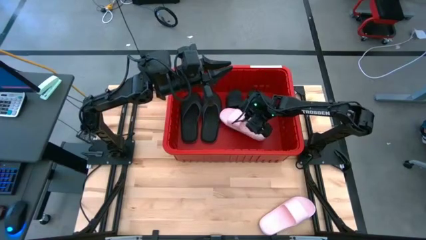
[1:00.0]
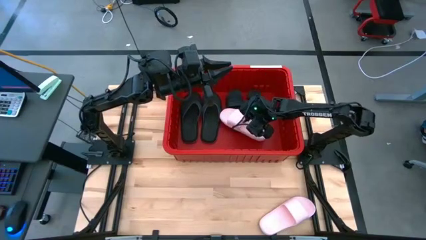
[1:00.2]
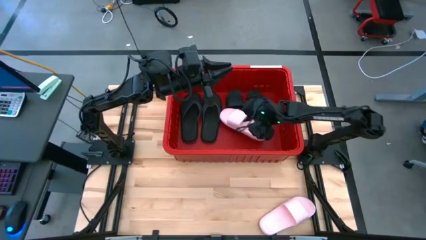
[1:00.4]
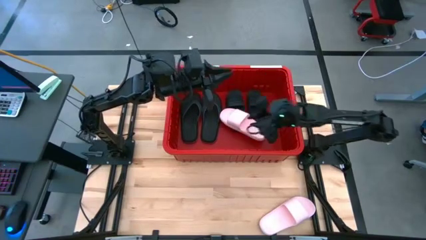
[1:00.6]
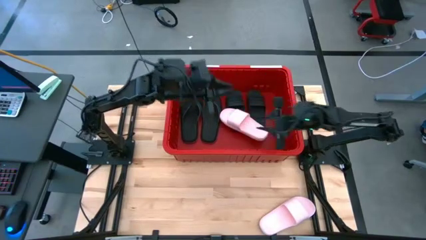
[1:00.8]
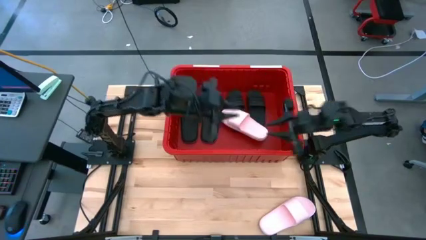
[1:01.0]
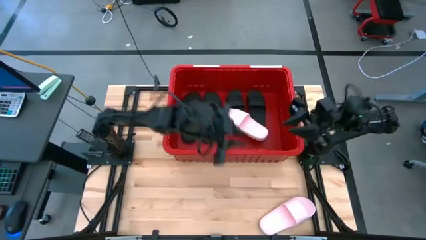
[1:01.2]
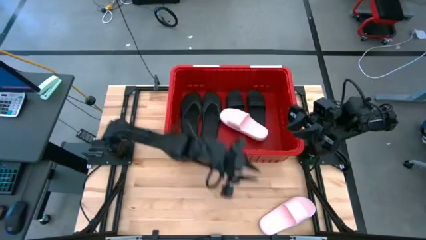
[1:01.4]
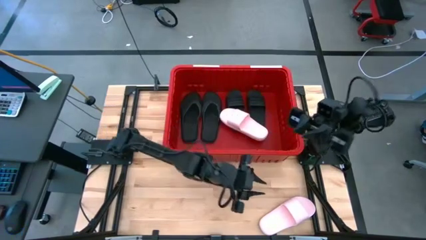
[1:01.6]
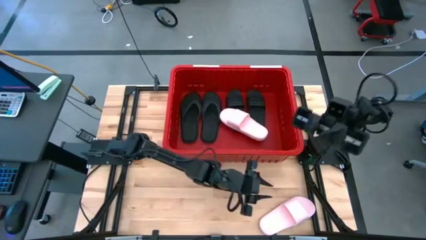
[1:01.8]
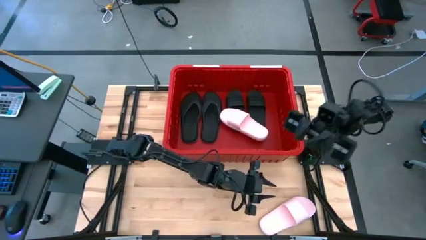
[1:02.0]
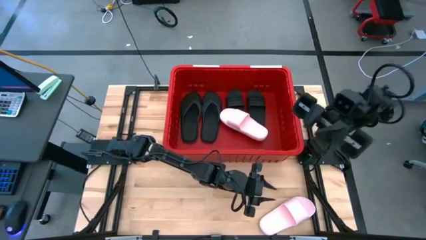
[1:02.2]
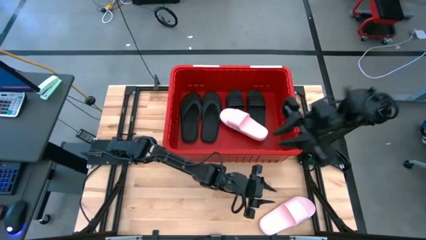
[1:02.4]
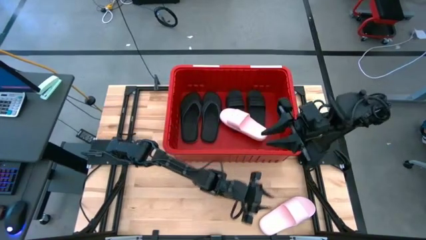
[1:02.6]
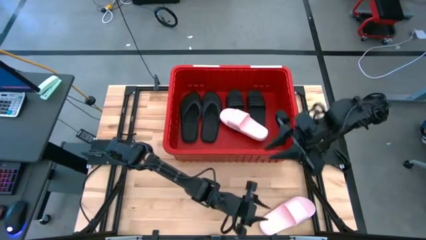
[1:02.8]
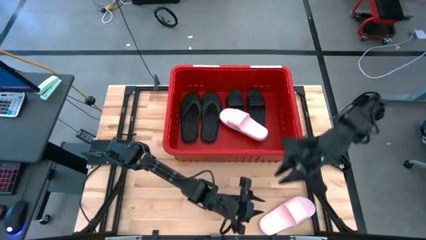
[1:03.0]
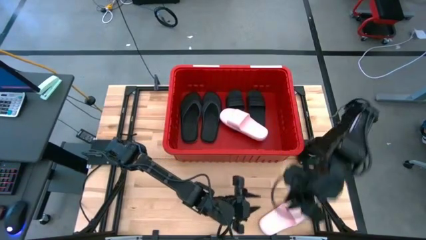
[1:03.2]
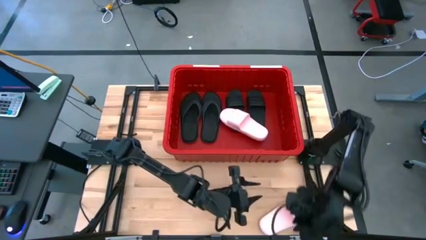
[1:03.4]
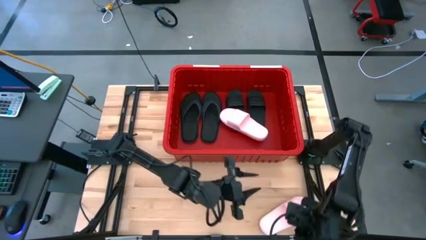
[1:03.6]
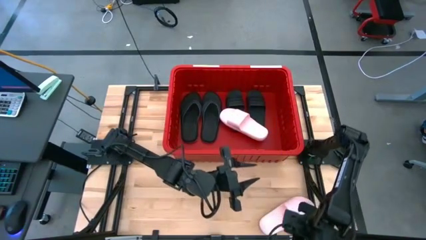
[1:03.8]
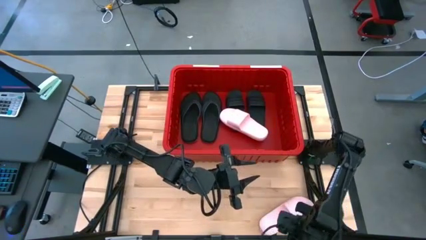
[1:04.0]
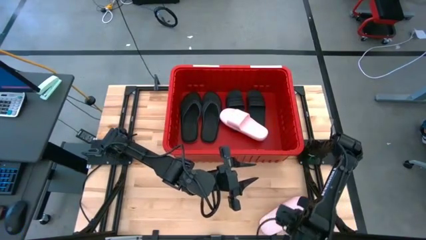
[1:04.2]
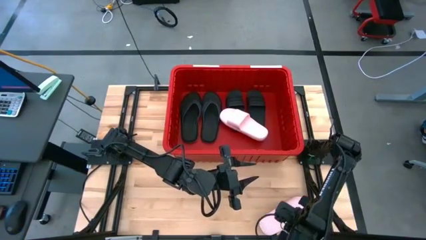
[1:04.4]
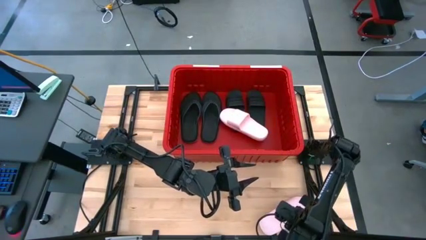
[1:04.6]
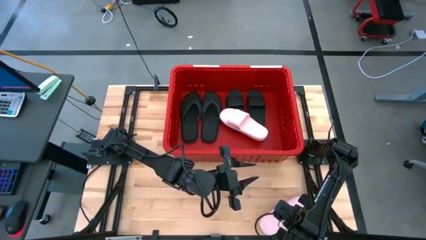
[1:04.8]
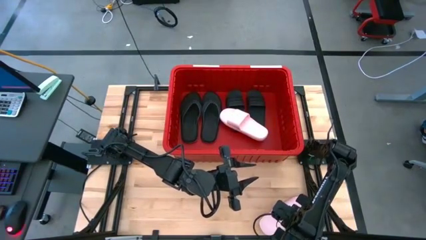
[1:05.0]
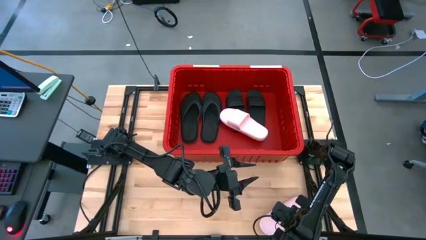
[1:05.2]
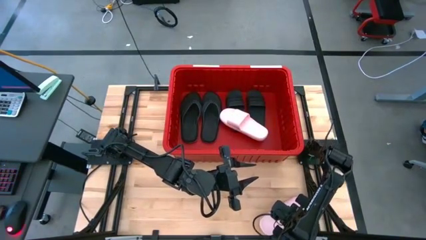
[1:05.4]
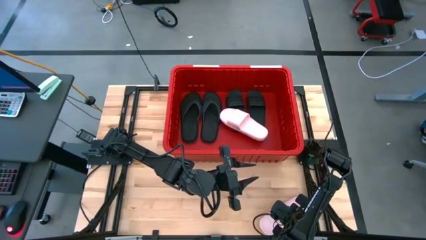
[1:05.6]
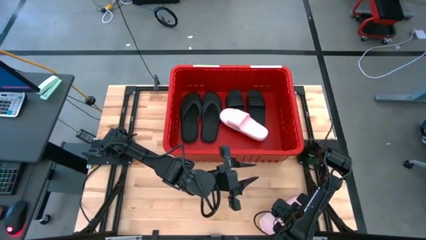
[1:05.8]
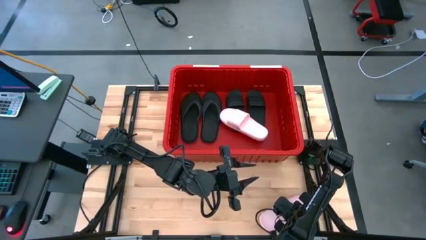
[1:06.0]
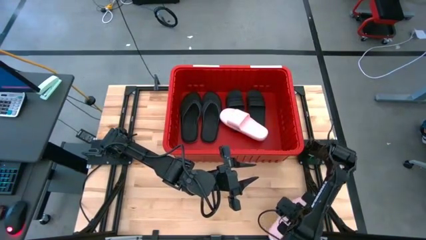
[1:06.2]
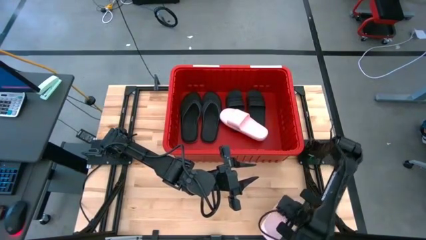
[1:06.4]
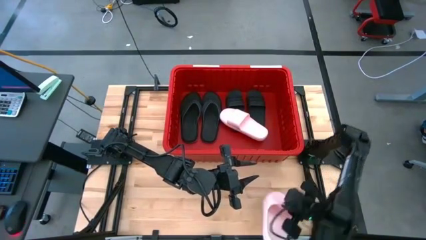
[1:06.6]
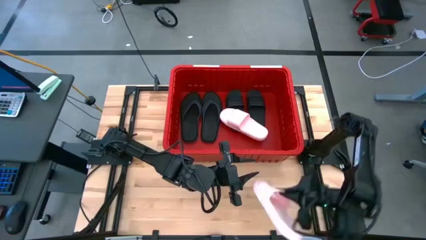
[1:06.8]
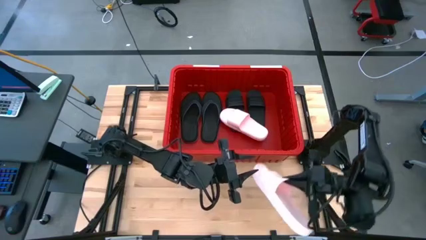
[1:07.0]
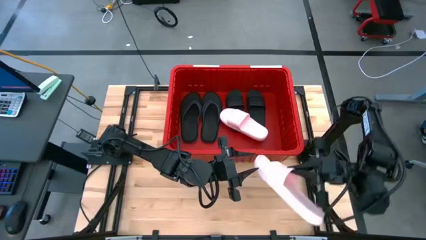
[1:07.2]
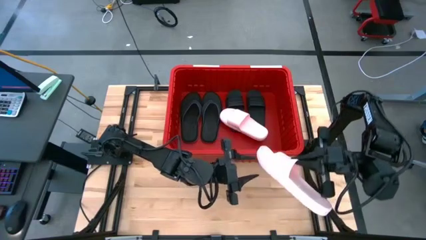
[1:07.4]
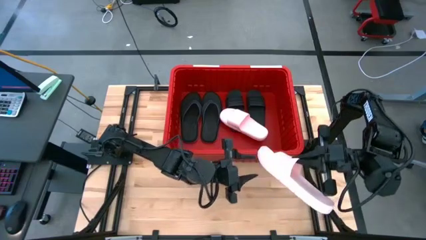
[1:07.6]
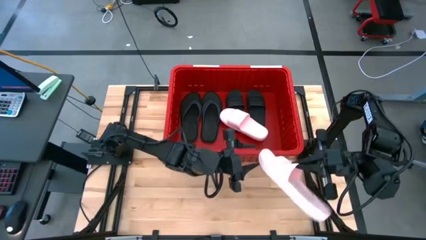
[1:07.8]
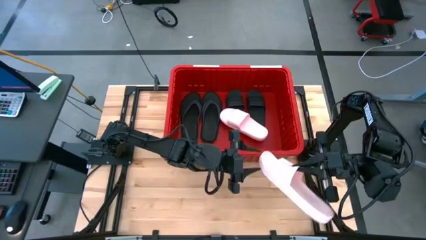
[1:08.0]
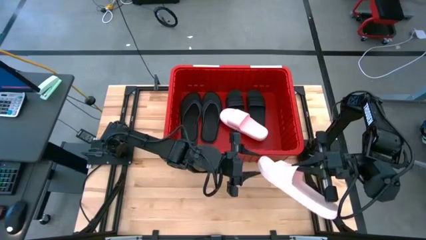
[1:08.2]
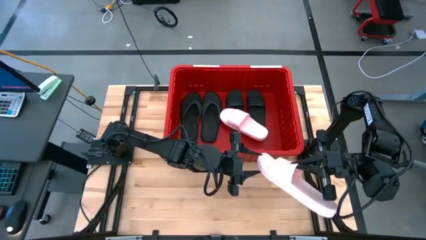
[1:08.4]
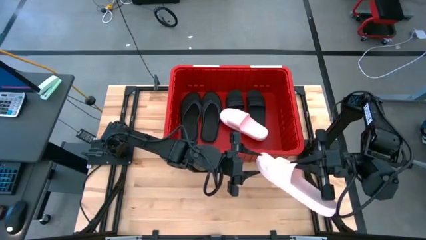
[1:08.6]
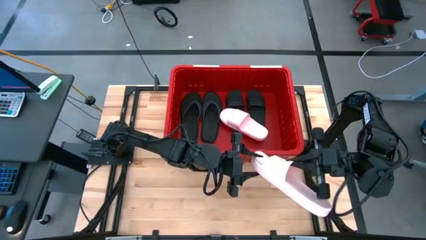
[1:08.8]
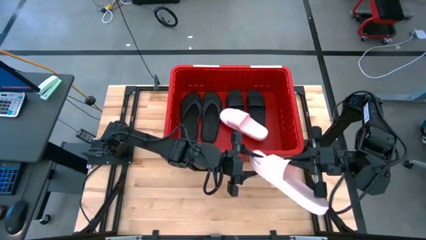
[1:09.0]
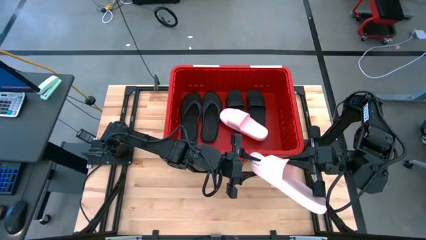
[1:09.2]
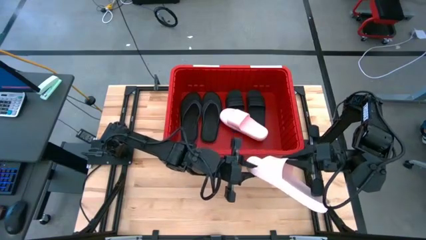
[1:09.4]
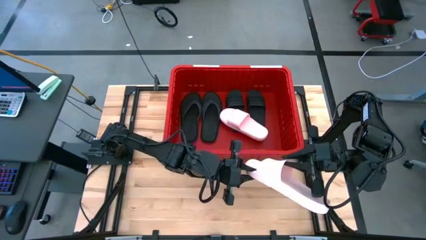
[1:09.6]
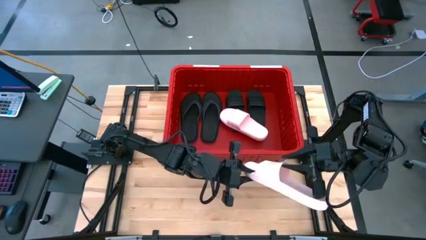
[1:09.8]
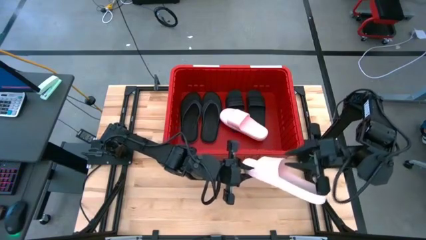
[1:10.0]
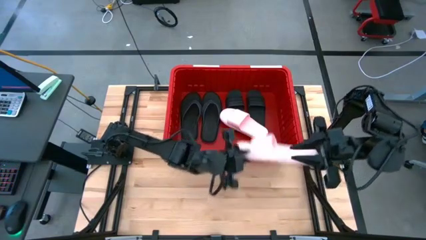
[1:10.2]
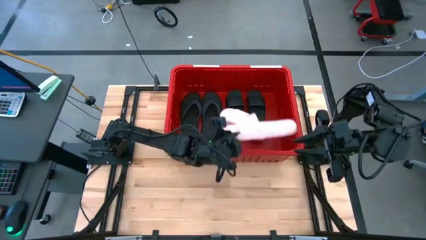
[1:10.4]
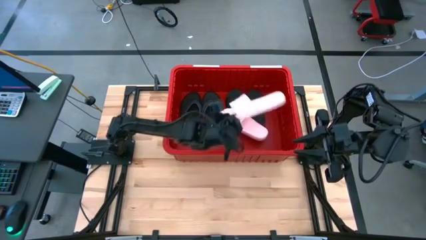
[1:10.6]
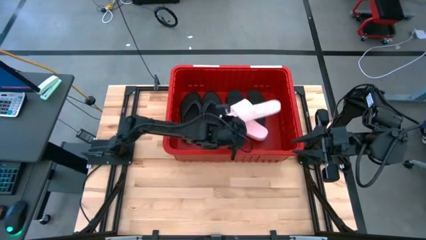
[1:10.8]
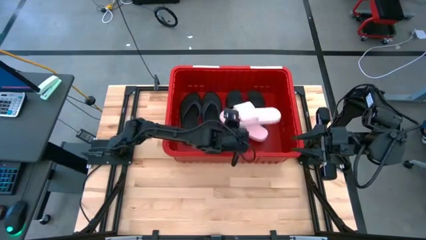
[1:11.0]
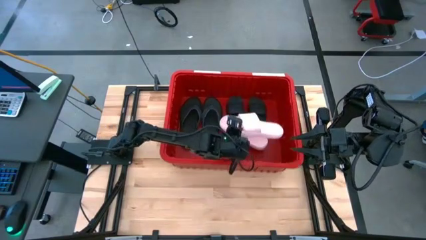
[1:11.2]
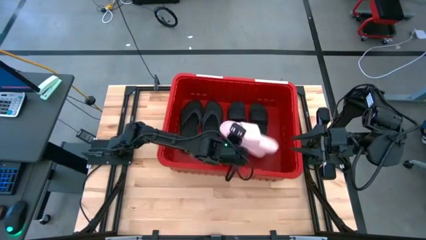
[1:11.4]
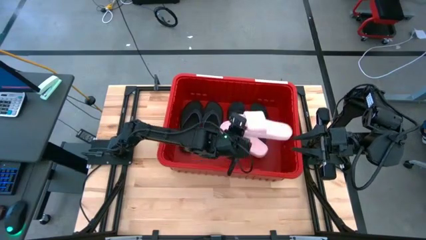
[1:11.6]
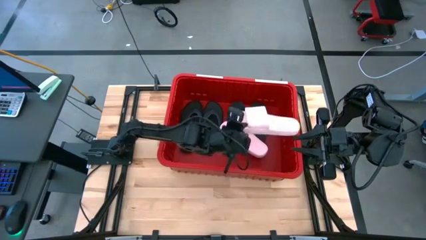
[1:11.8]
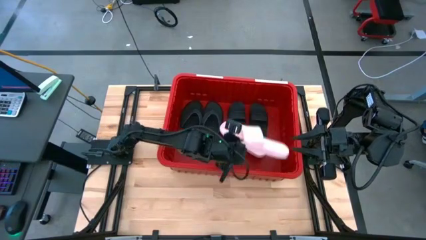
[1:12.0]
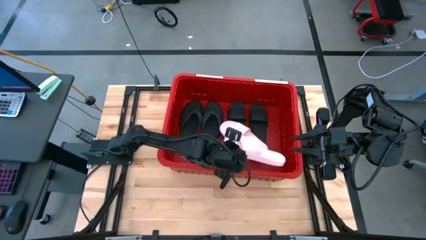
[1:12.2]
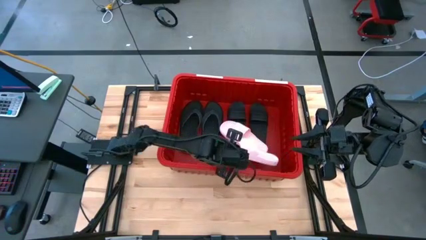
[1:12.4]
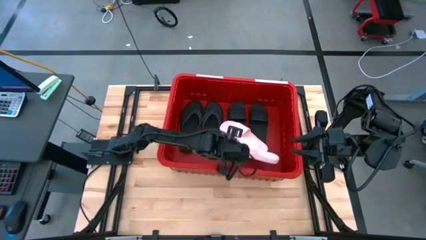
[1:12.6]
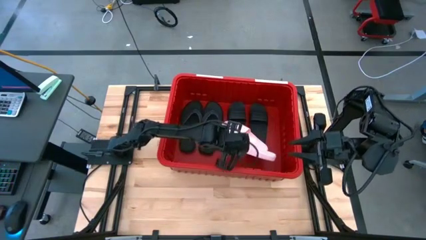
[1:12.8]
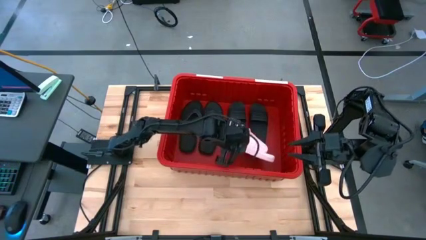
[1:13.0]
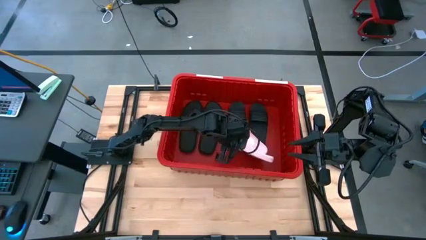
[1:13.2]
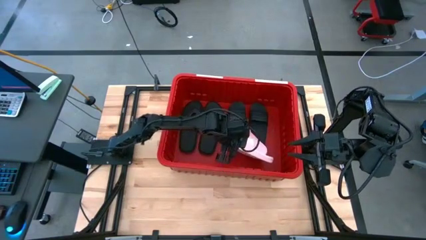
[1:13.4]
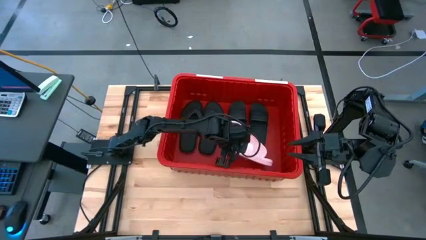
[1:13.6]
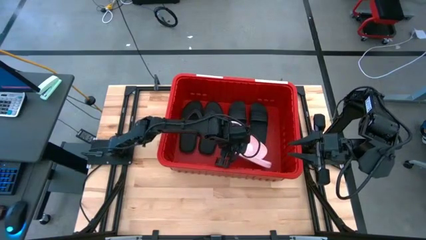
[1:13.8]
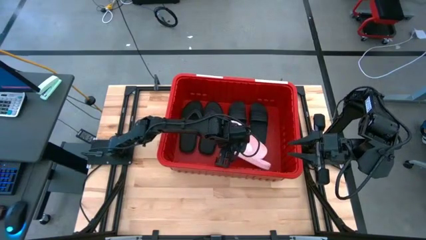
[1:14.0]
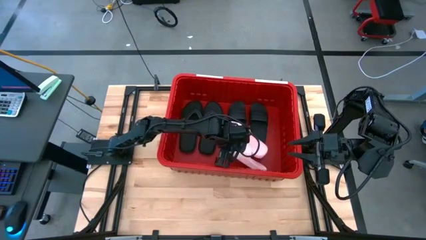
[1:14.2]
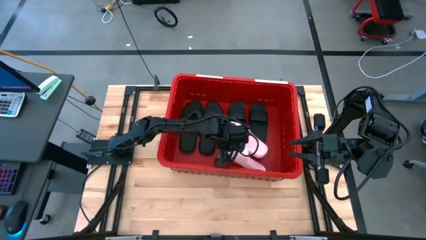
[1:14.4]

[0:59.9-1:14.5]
Task: Pick and place slides into bin
Put the pink slide into the red bin
